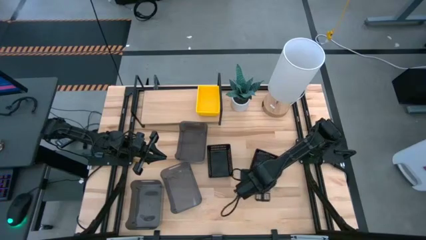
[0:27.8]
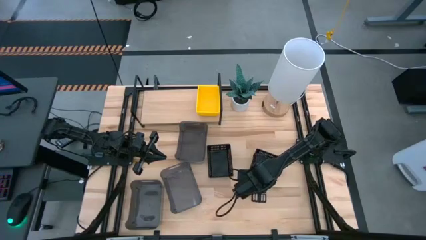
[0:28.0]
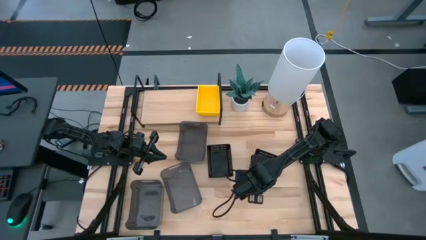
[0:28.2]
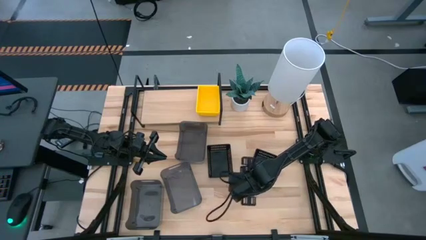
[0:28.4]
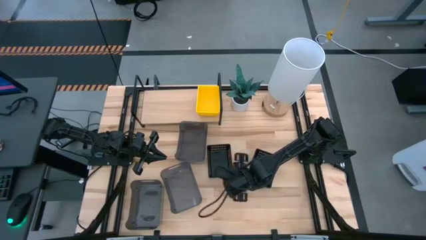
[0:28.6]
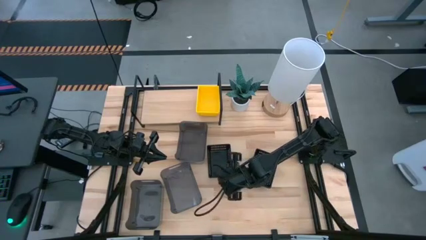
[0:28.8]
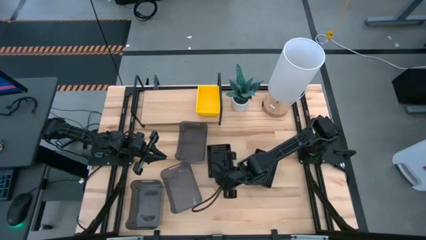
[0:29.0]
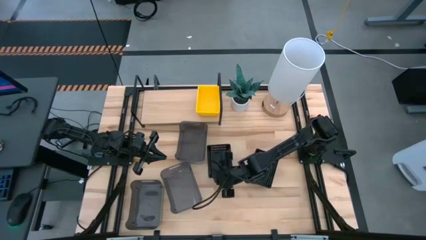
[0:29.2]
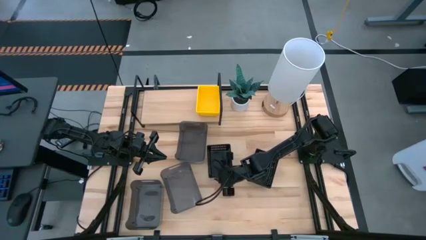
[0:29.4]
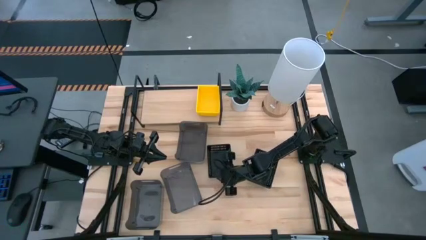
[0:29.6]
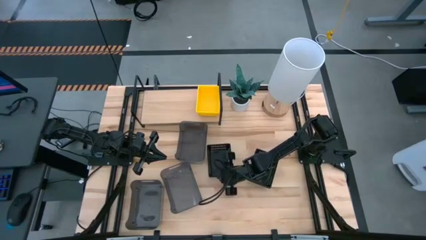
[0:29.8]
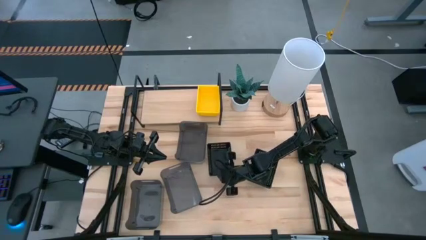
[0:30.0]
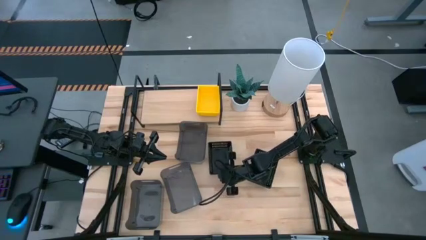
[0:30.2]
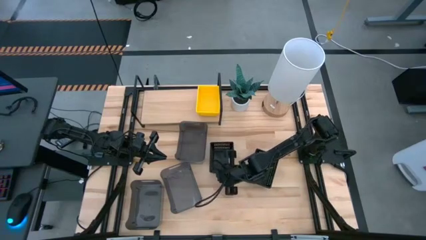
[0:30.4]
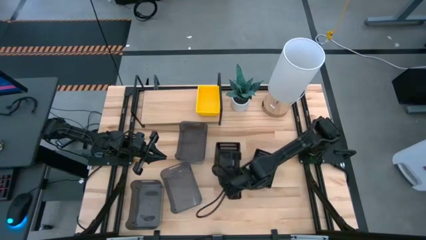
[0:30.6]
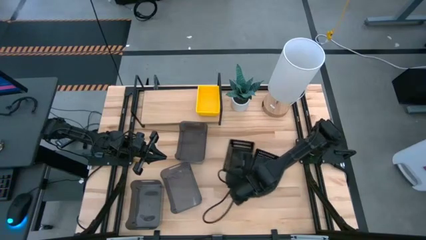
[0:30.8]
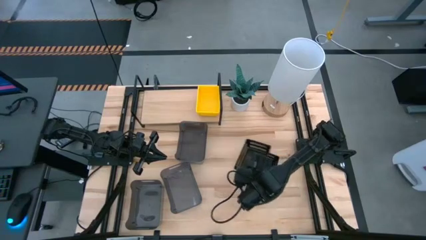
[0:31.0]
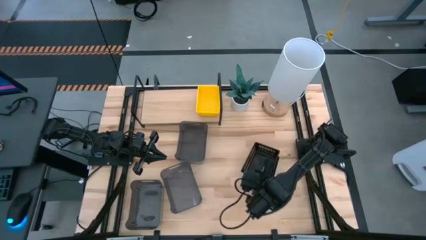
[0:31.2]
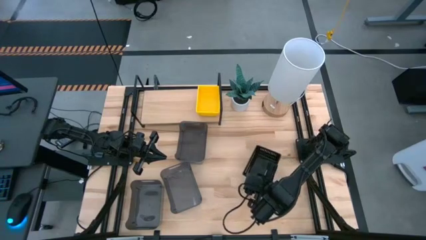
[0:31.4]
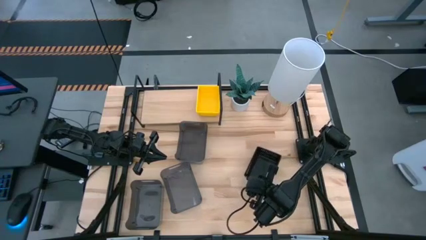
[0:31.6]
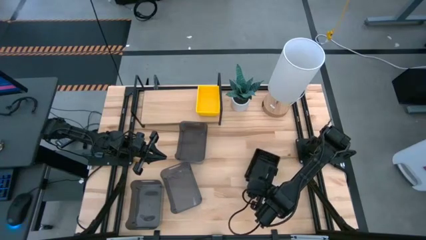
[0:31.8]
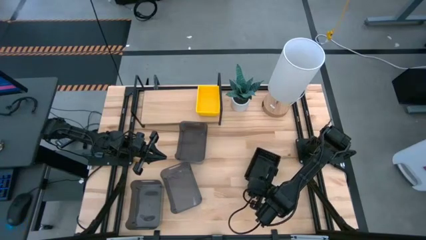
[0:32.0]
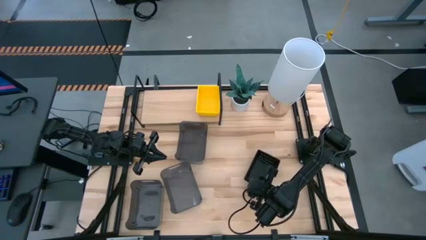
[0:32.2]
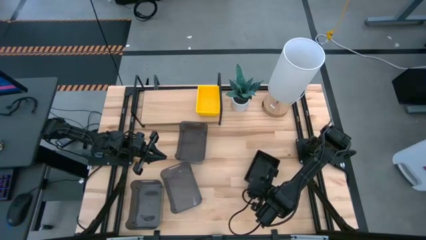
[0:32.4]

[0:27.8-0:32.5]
Task: Stack baskets on shelf by color
Stack the left black bin on top of the right black bin

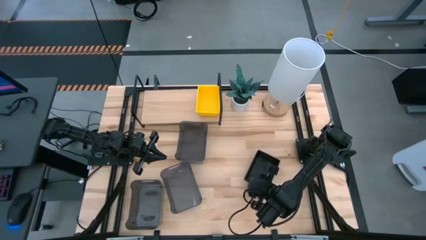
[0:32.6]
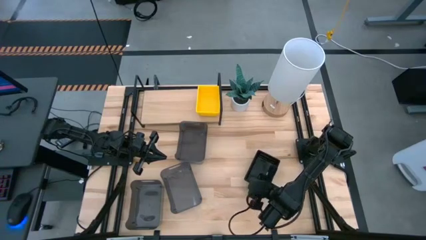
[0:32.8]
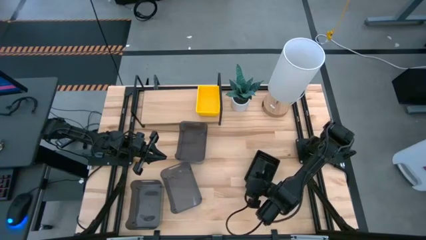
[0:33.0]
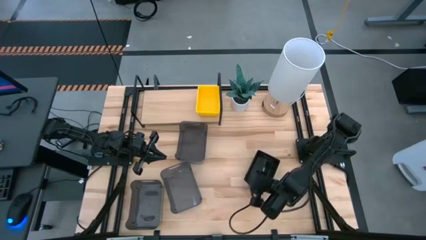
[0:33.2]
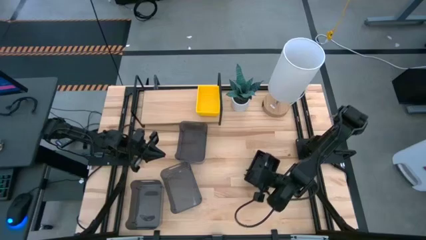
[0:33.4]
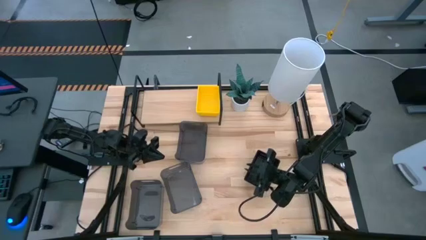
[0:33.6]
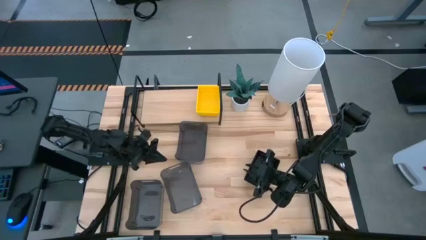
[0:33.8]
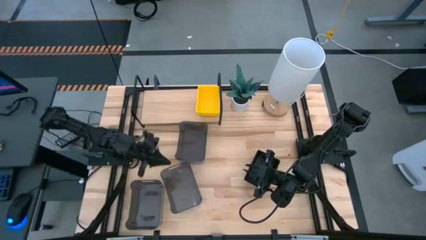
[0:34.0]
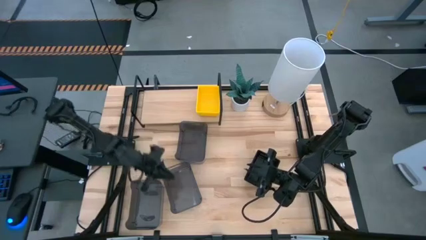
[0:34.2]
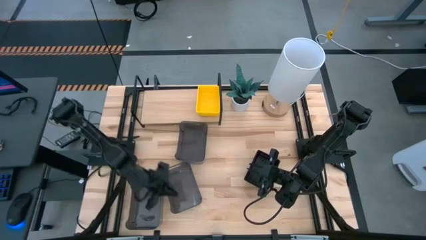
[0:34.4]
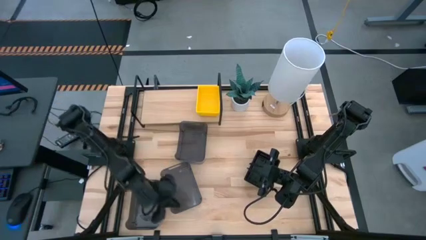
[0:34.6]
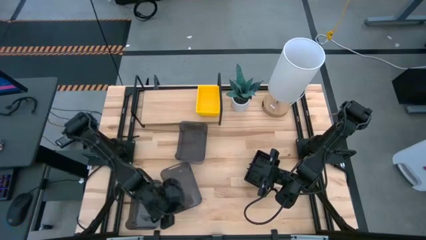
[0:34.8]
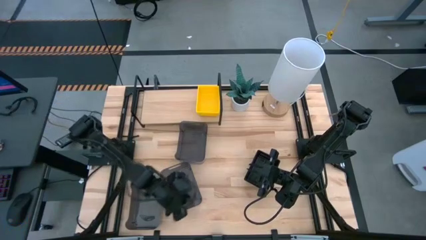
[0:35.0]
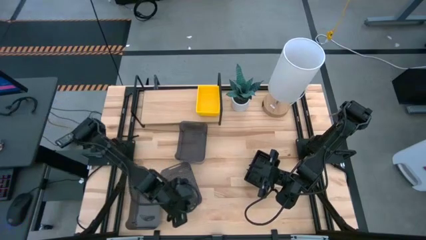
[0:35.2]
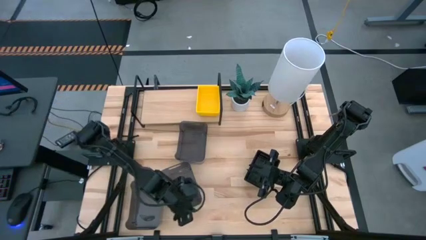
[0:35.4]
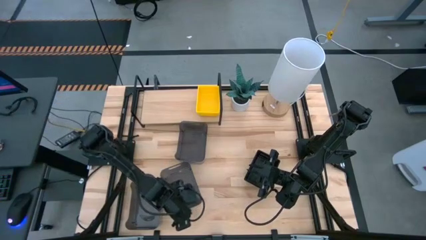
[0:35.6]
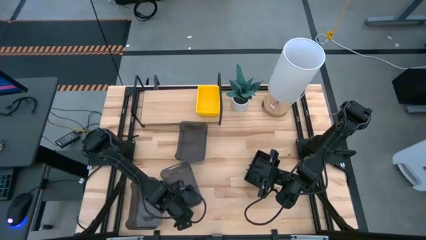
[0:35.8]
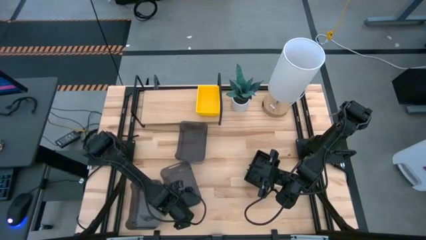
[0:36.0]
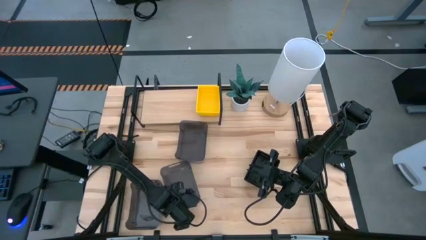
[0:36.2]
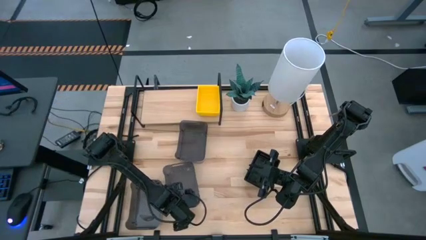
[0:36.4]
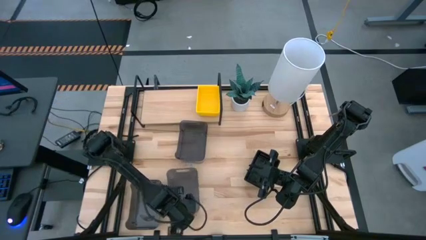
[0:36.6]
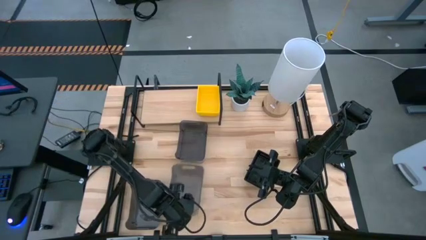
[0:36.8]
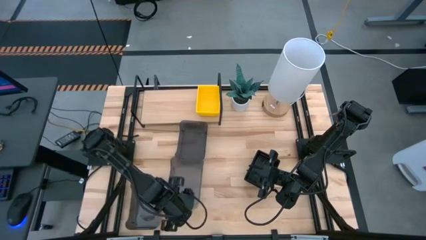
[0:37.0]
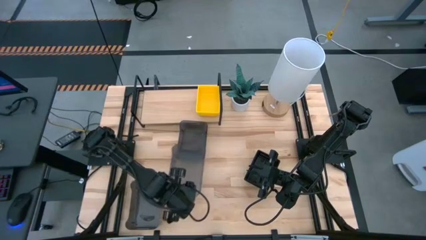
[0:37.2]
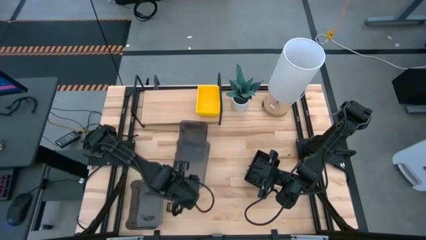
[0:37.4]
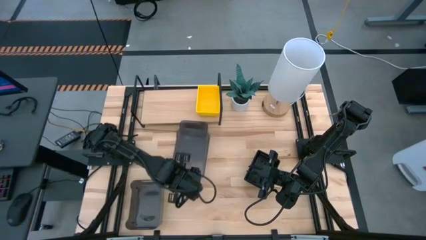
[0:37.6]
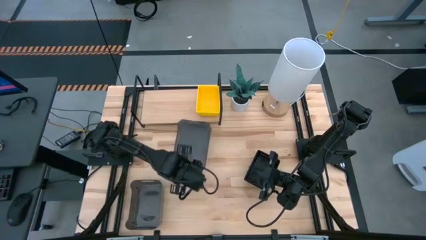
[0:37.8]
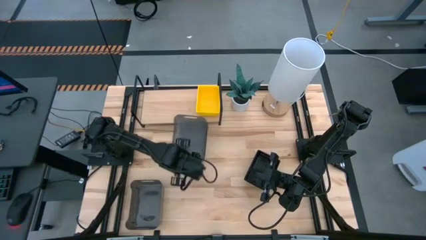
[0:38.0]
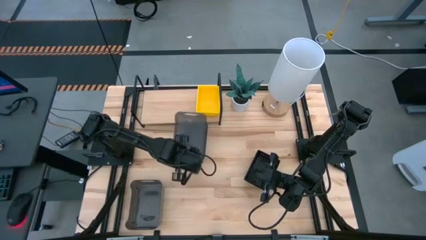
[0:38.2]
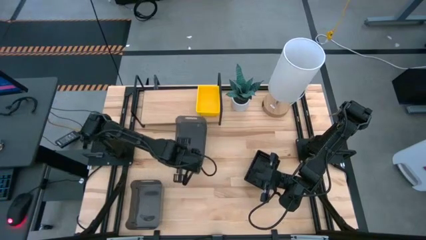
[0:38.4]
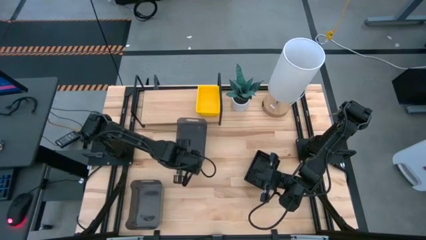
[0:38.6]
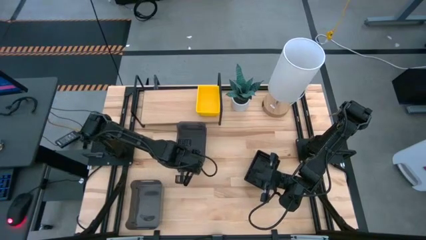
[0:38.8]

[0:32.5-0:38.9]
Stack the bottom right gray bin on top of the top gray bin

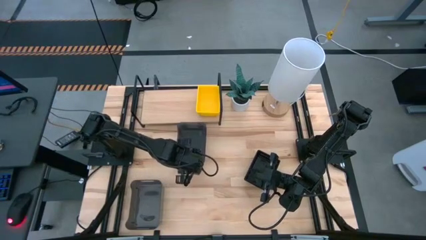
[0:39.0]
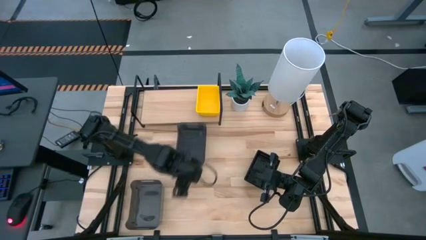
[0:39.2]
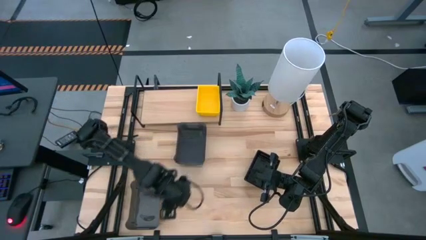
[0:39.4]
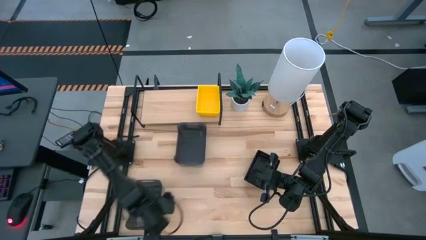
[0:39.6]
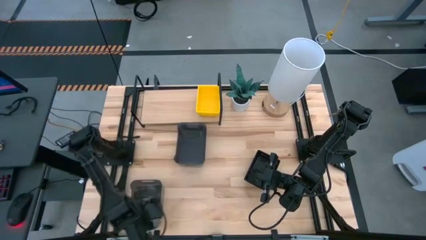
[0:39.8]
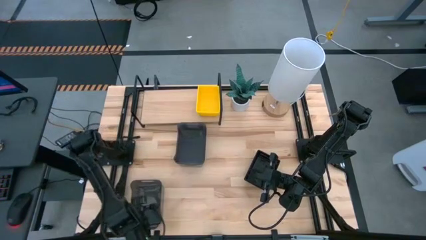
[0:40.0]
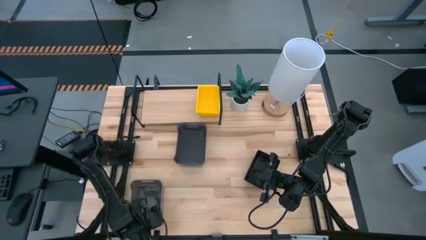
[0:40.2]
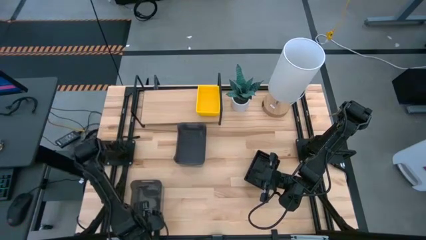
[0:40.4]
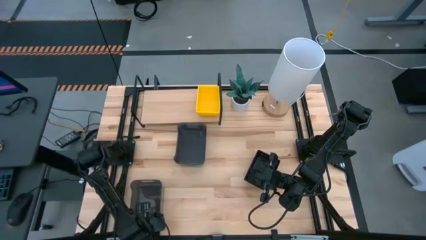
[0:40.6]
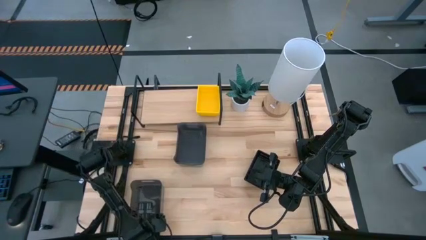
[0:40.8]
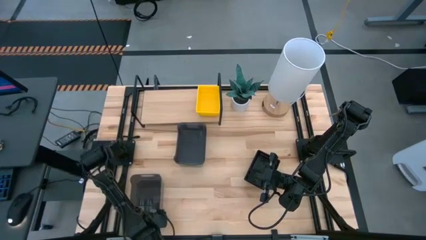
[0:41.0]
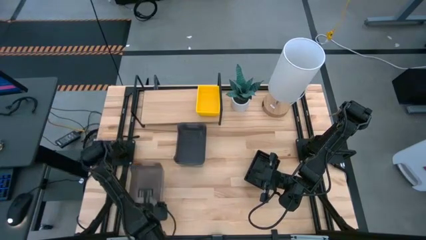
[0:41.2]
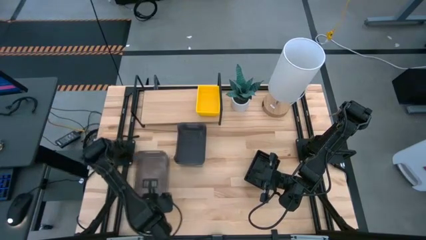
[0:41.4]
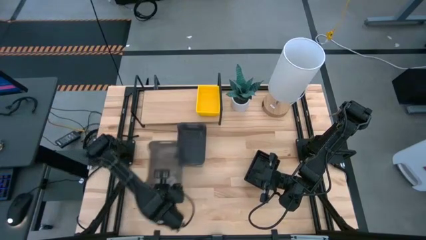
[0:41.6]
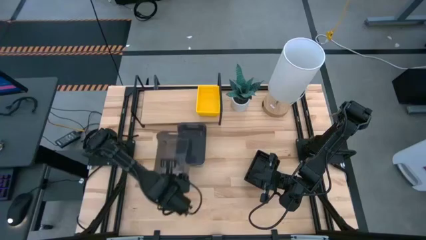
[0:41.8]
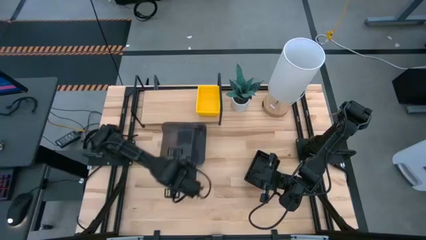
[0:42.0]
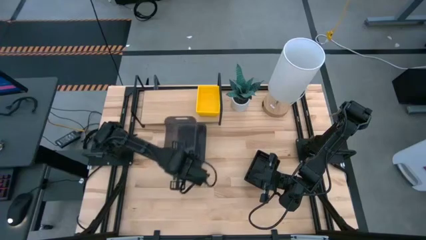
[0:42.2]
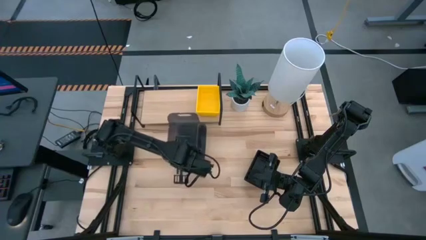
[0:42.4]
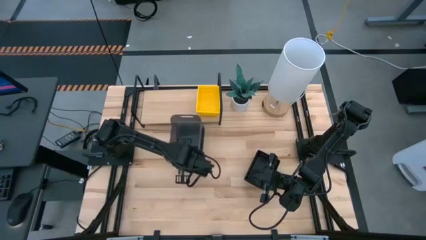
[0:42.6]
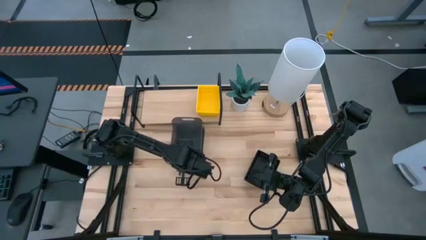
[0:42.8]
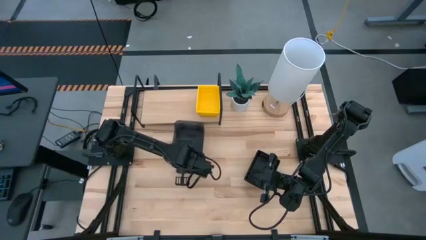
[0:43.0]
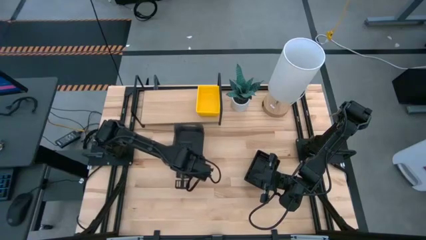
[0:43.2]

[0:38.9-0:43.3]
Stack the bottom gray bin on top of the top gray bin

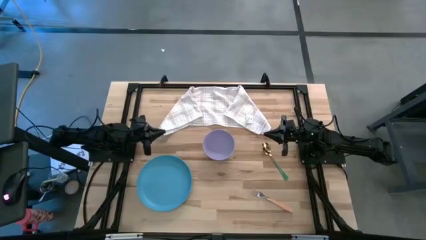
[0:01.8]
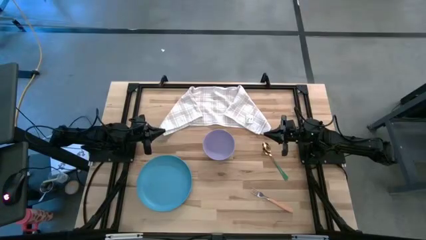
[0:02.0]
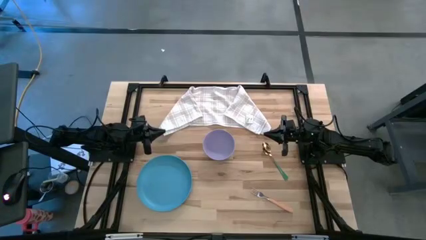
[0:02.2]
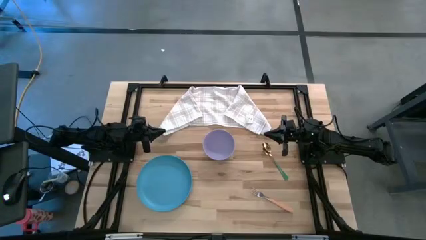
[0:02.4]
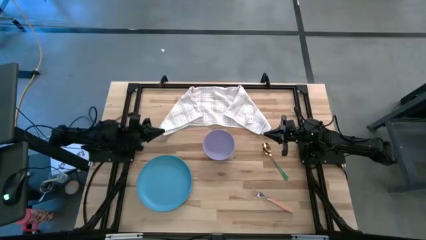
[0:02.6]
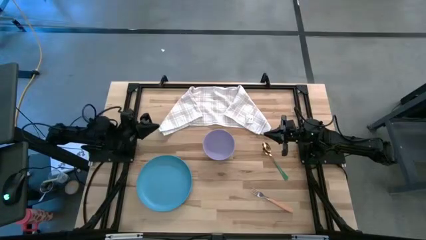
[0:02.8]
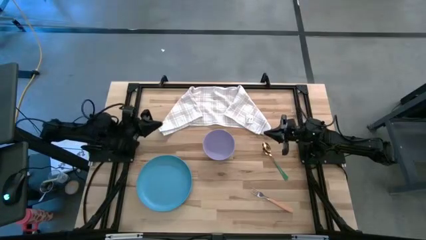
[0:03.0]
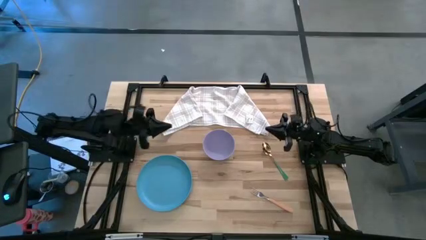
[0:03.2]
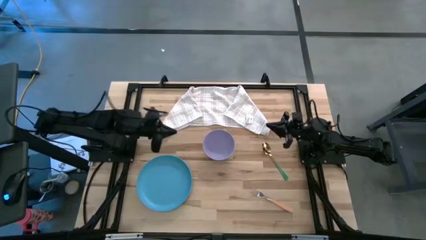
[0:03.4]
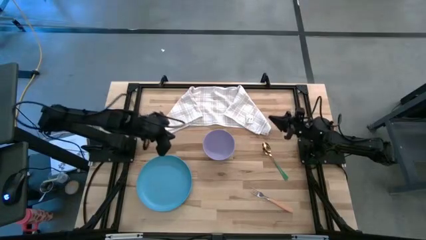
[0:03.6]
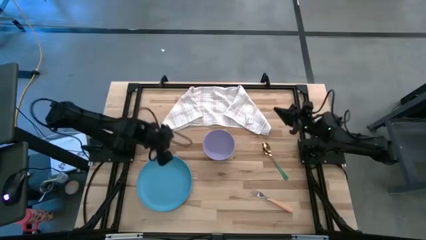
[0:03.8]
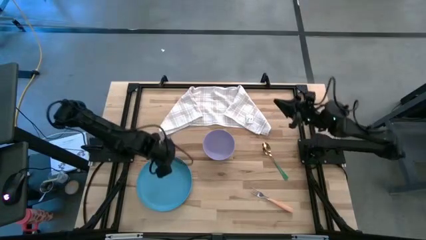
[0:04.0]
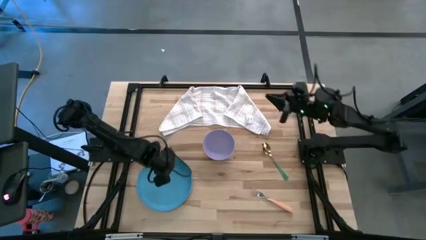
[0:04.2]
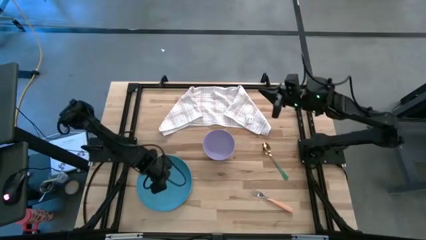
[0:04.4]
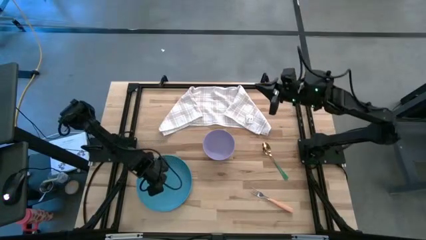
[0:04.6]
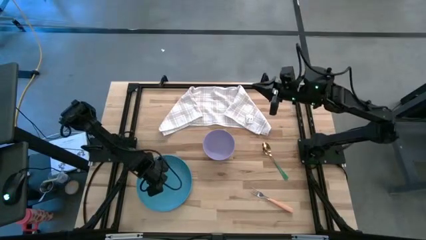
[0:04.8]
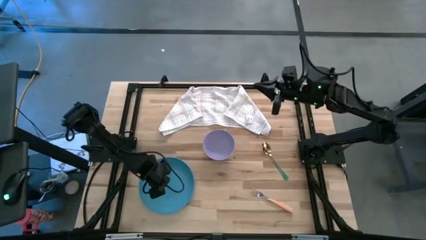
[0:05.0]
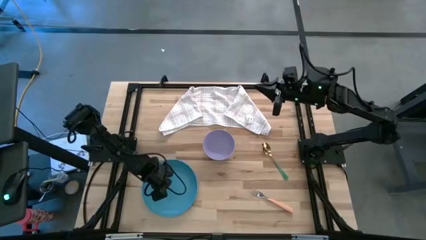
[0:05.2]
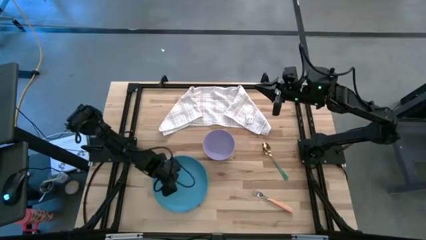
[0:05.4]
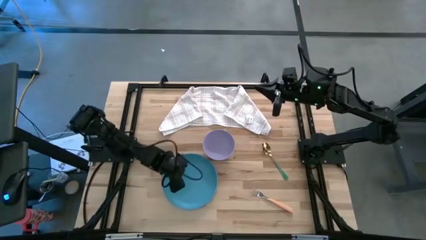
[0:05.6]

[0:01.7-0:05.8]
Task: Set table place
Move the blue plate to the center of the table
